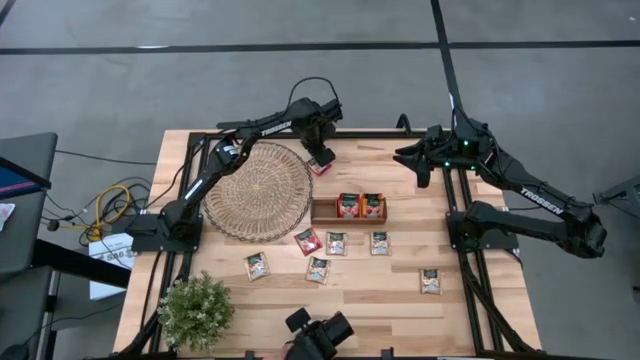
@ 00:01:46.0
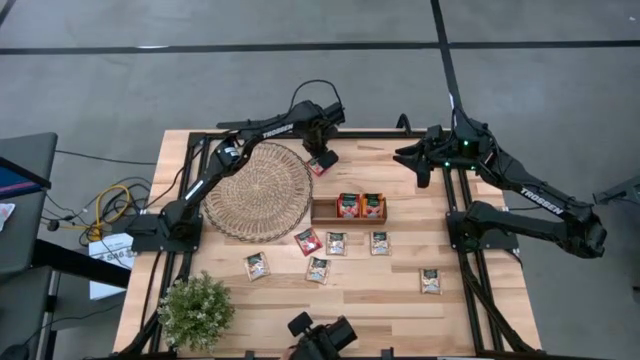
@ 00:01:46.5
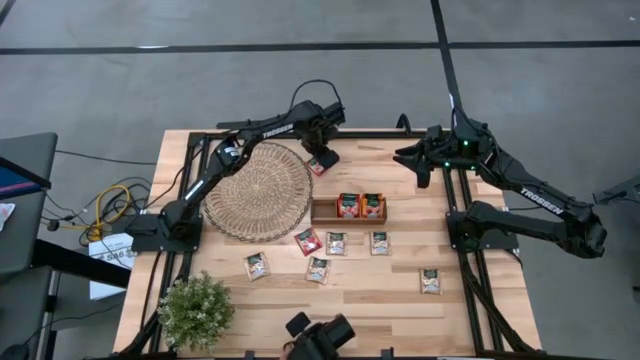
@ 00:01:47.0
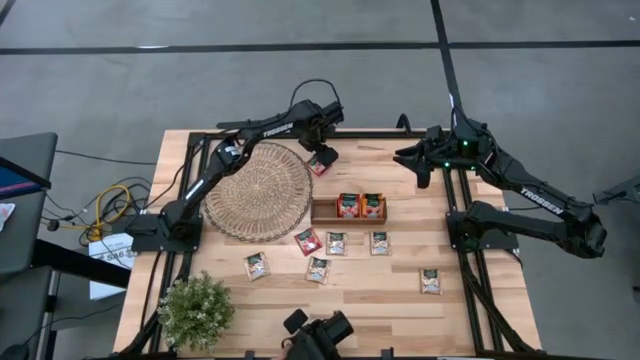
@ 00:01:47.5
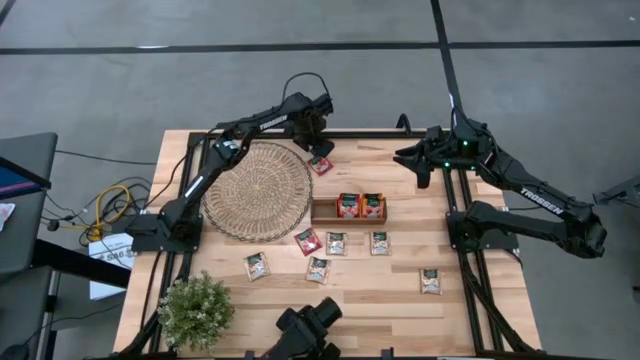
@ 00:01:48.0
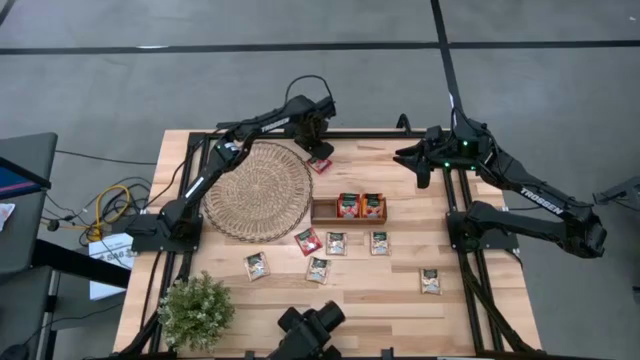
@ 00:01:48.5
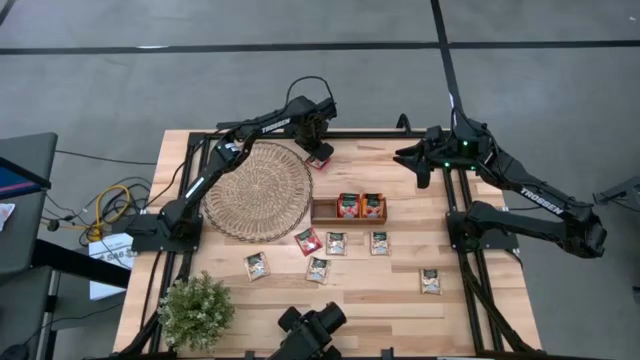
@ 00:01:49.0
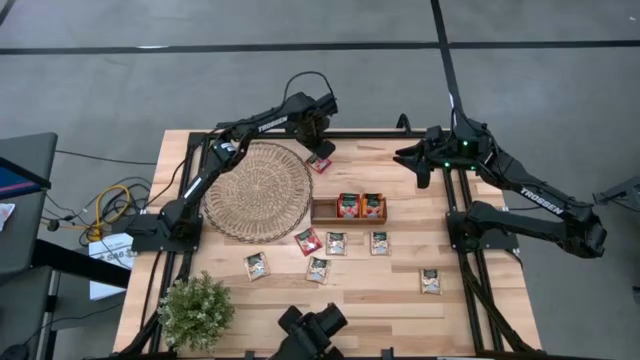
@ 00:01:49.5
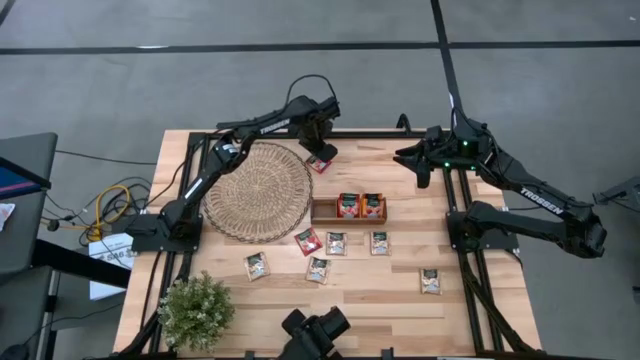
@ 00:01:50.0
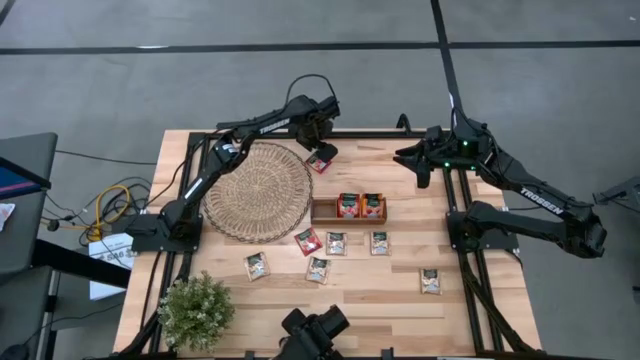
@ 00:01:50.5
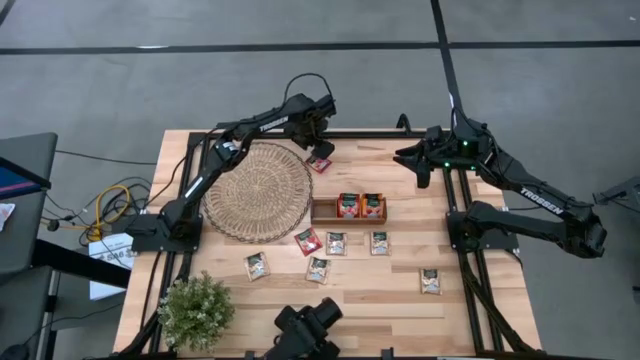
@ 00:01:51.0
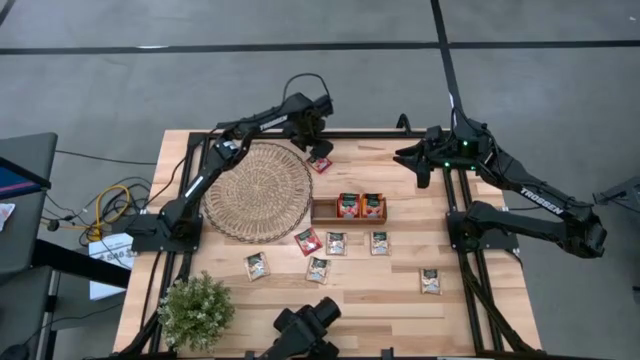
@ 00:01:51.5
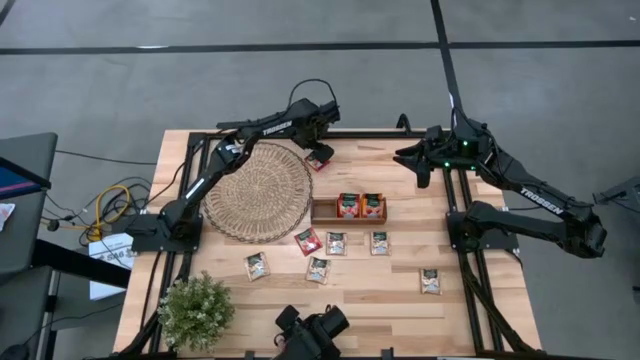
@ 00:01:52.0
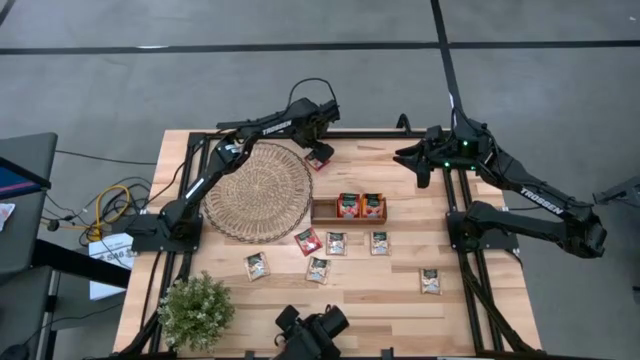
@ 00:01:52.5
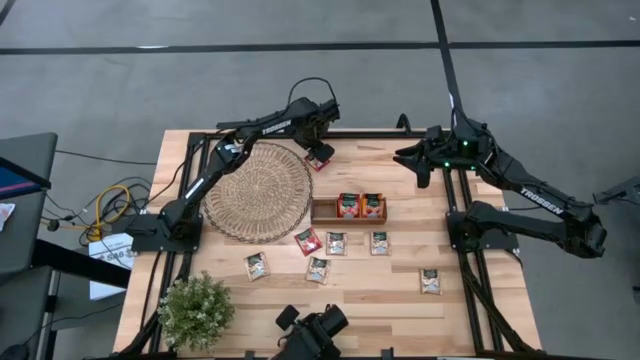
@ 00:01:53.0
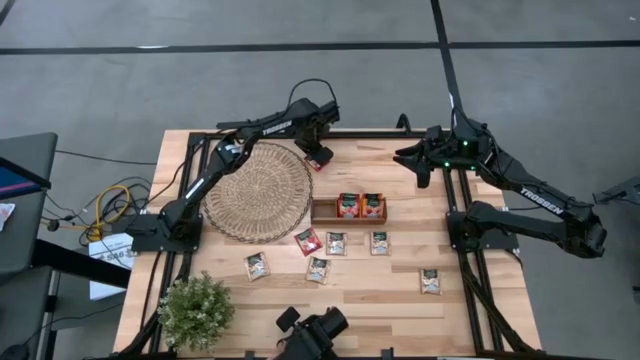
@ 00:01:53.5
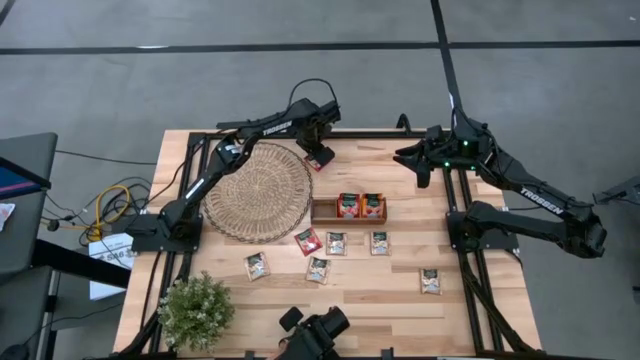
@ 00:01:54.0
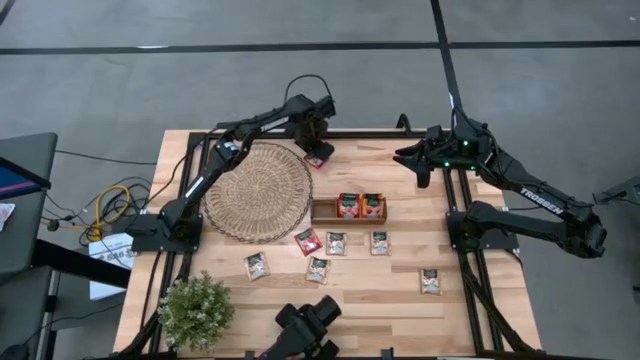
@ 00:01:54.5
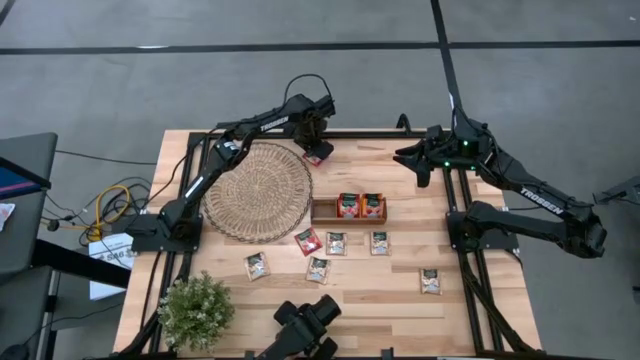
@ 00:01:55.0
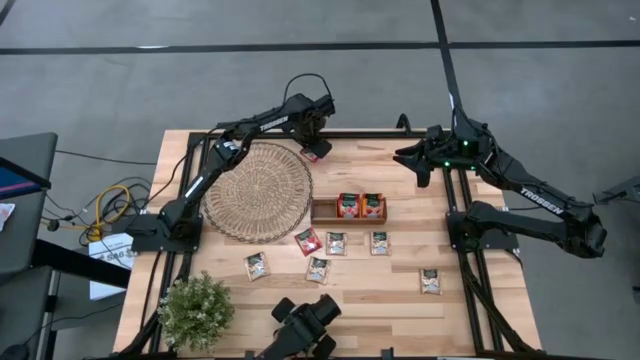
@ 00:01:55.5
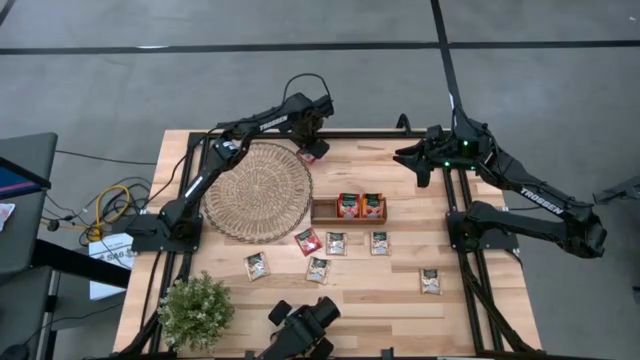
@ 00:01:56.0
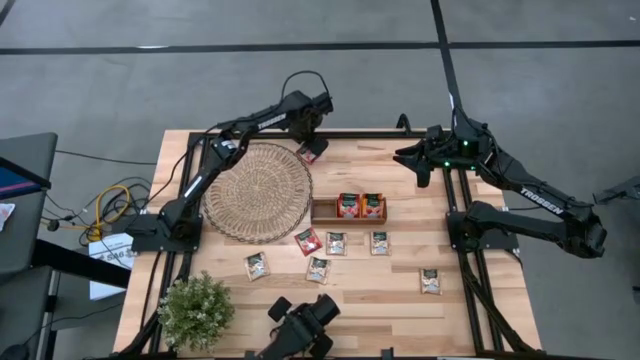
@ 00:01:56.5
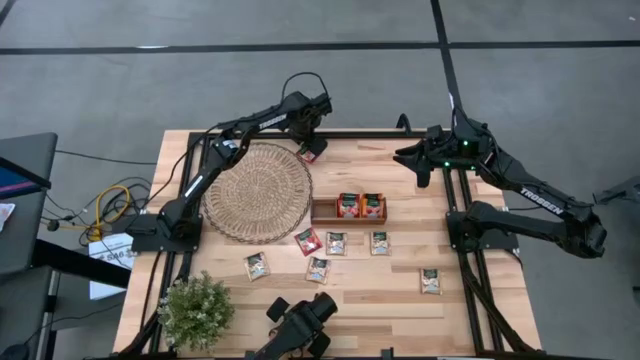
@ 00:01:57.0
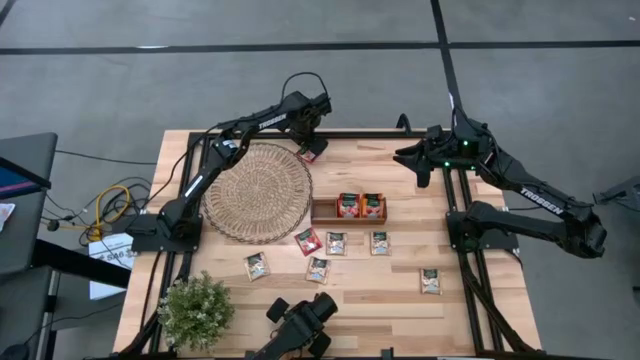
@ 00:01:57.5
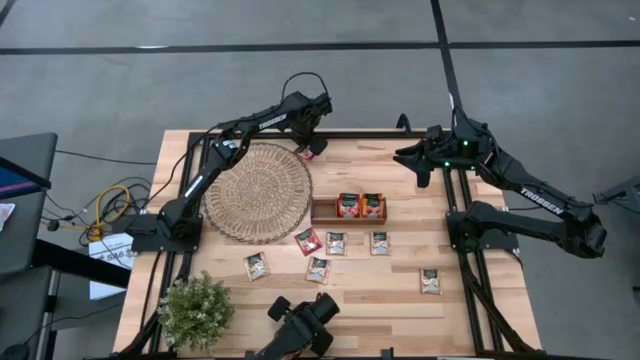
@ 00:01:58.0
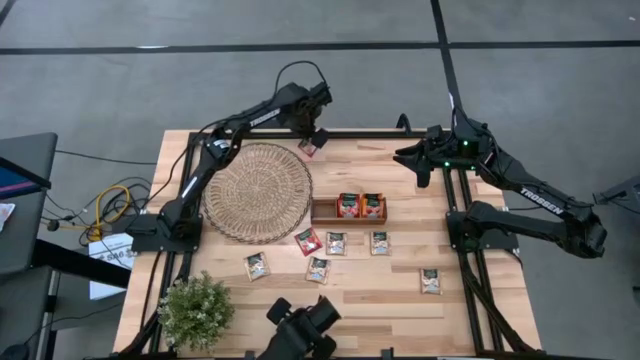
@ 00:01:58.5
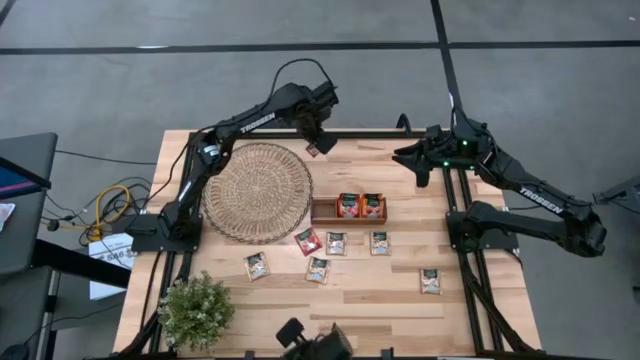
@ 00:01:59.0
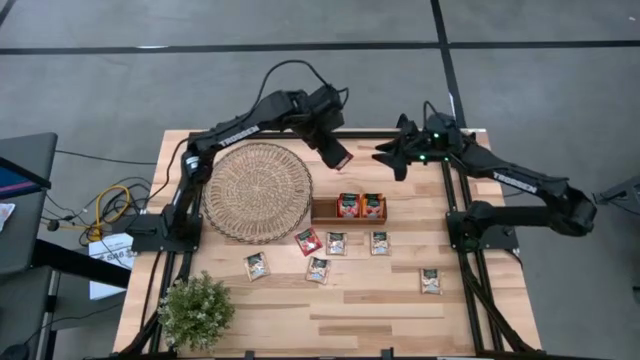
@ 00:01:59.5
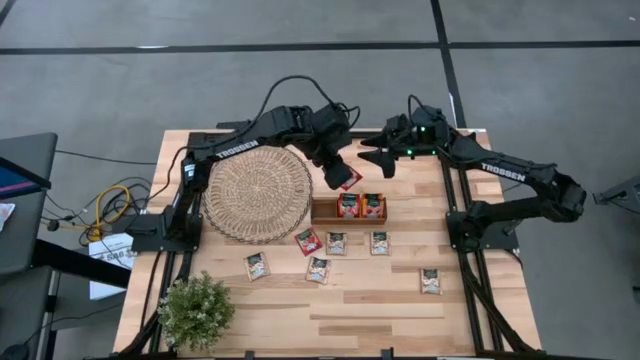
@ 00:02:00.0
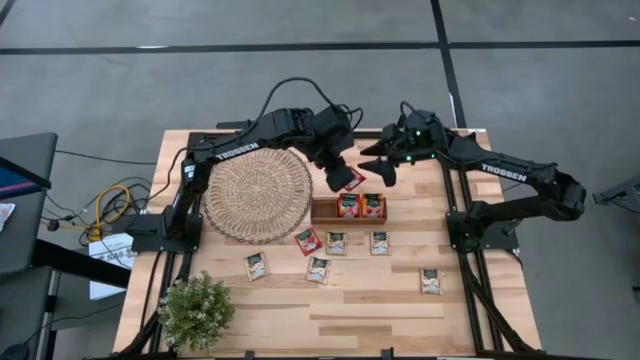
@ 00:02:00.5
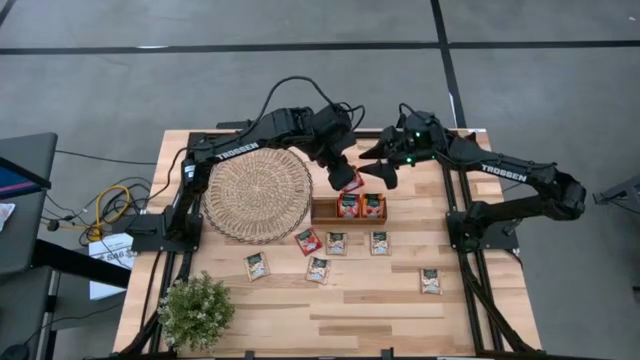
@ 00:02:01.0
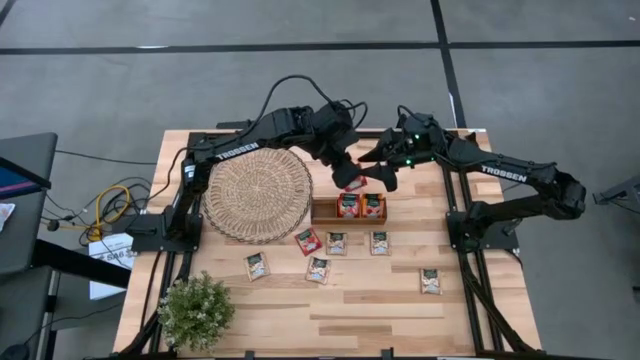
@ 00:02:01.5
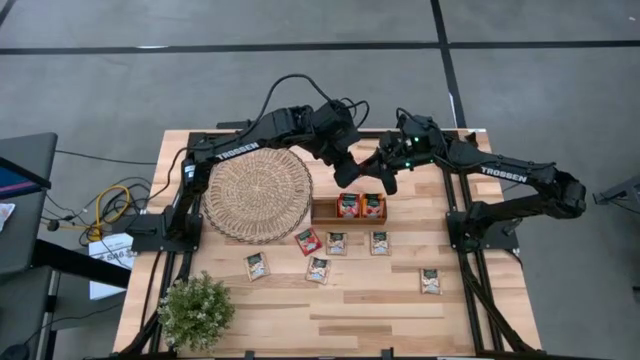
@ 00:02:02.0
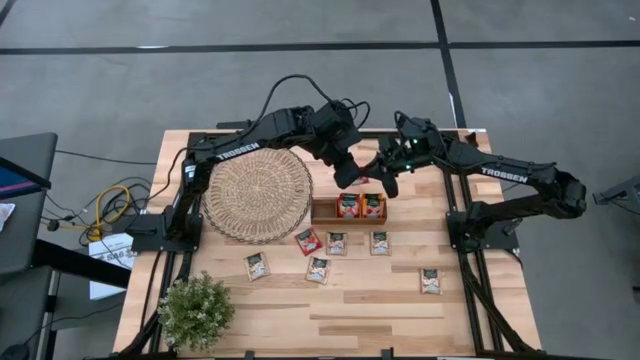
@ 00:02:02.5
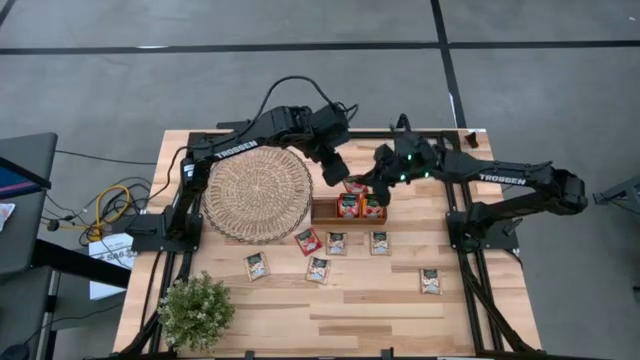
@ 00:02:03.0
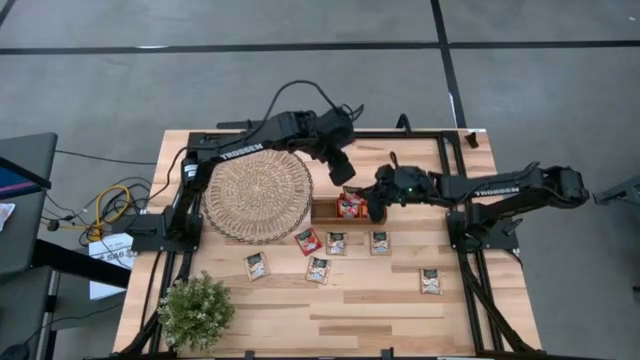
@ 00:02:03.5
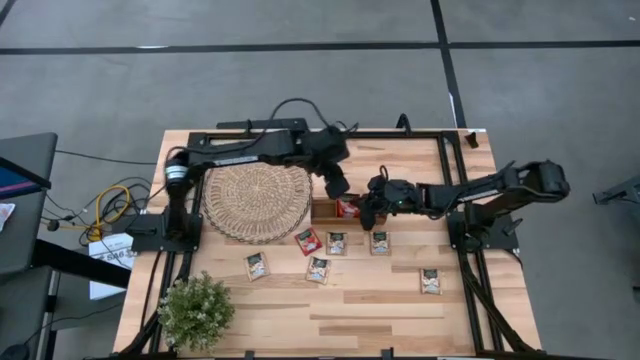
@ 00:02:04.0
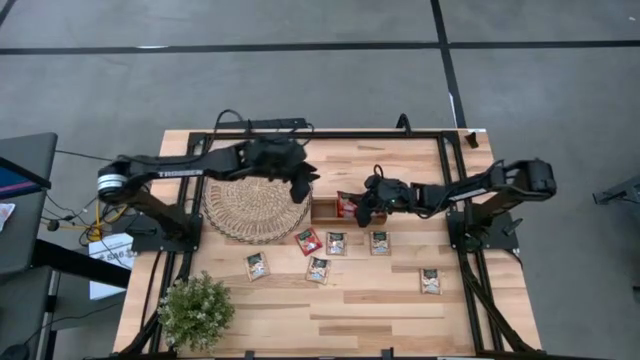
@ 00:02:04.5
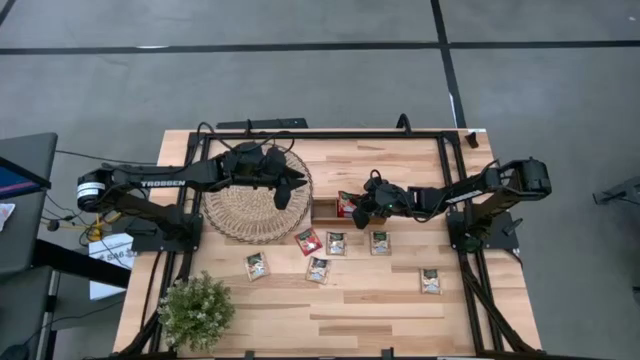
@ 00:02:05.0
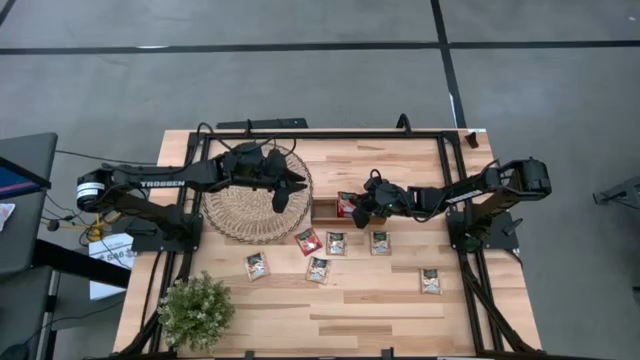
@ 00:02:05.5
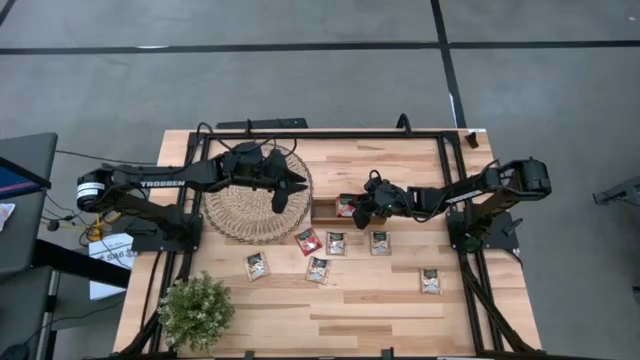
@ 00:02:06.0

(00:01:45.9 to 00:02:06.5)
Task: Pick & Place Tea
Put the red tea bag into the middle section of the wooden organizer
